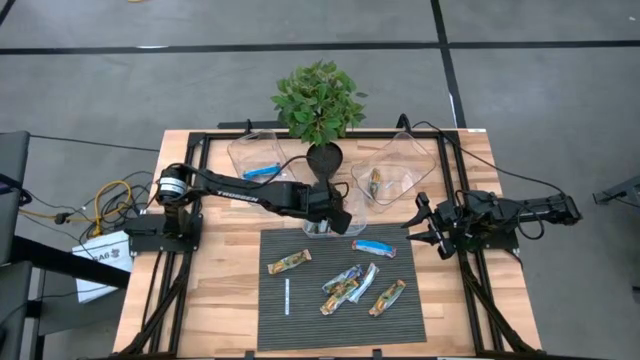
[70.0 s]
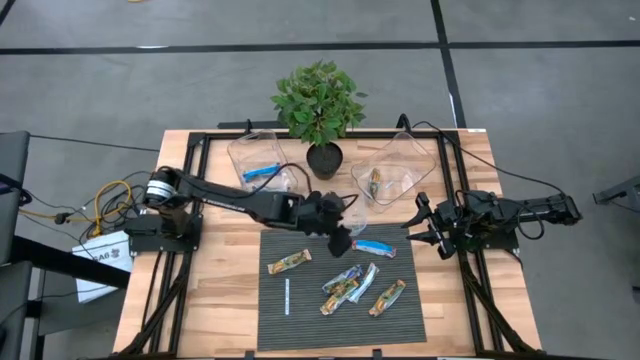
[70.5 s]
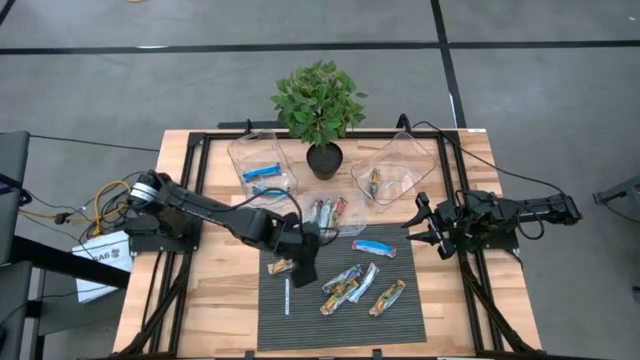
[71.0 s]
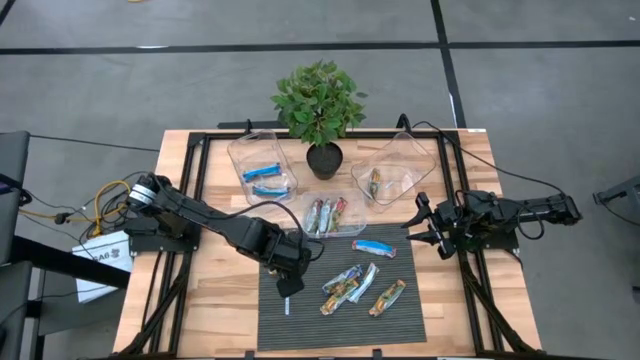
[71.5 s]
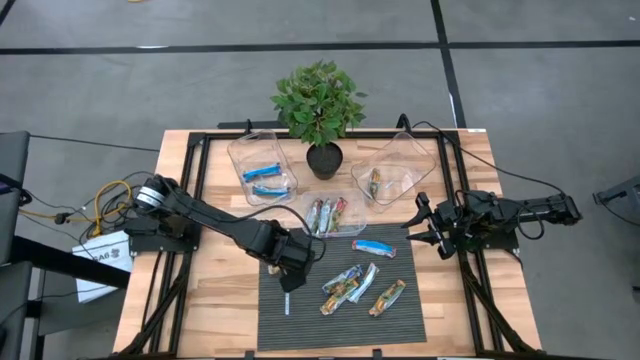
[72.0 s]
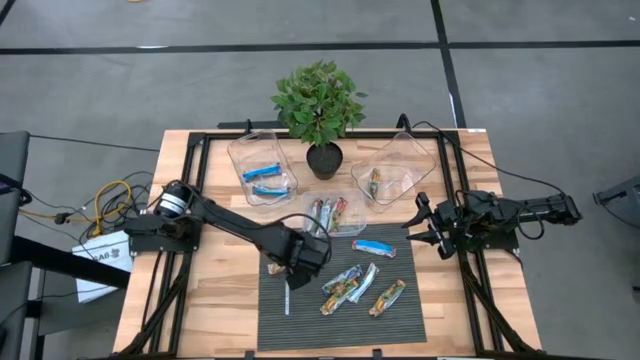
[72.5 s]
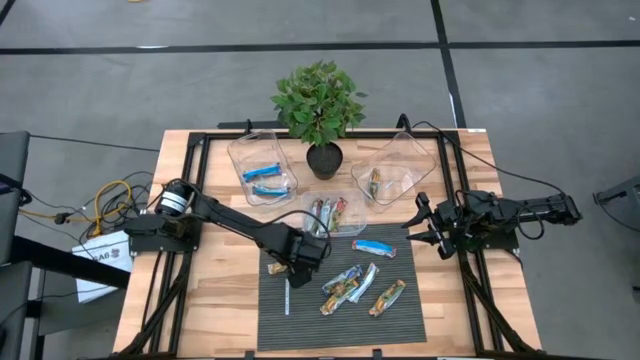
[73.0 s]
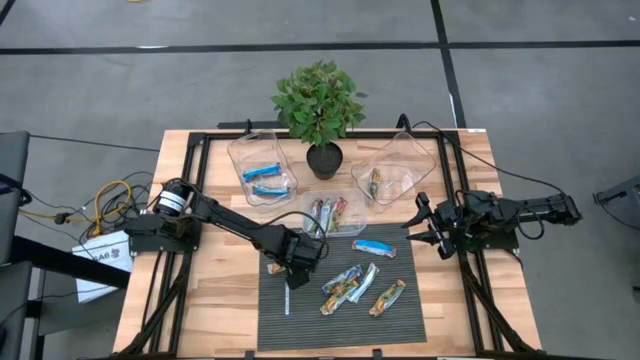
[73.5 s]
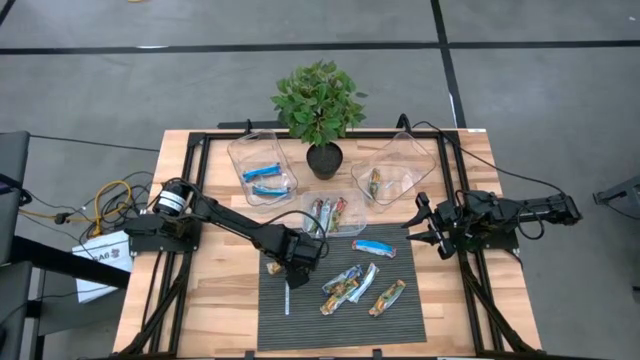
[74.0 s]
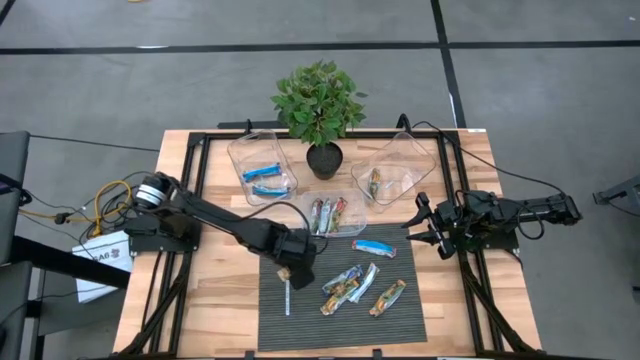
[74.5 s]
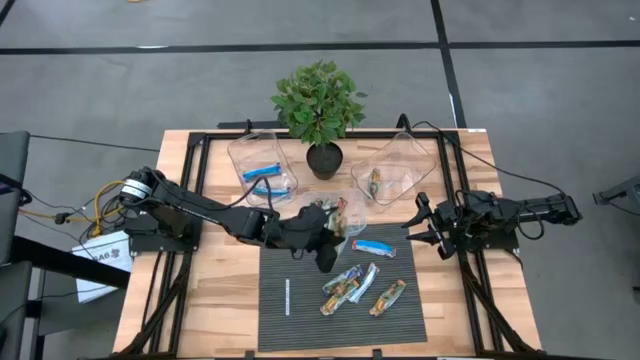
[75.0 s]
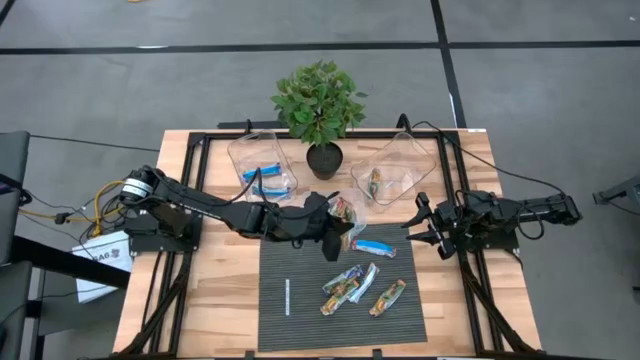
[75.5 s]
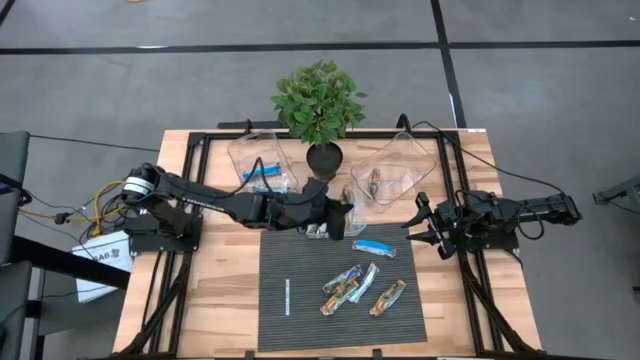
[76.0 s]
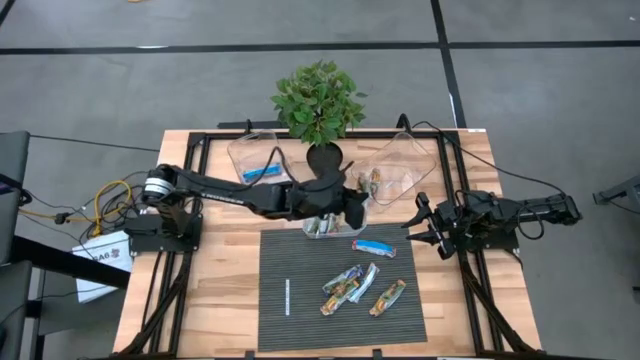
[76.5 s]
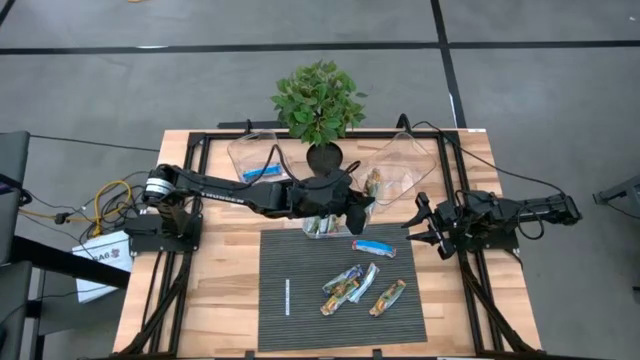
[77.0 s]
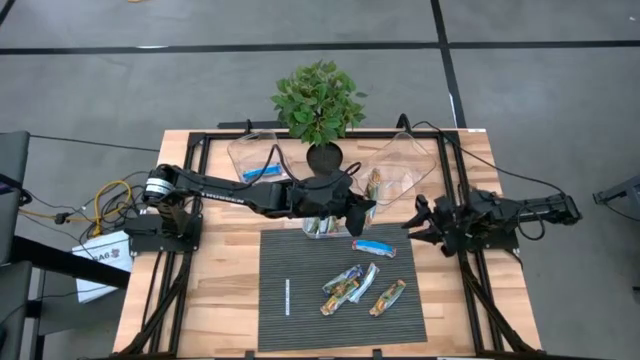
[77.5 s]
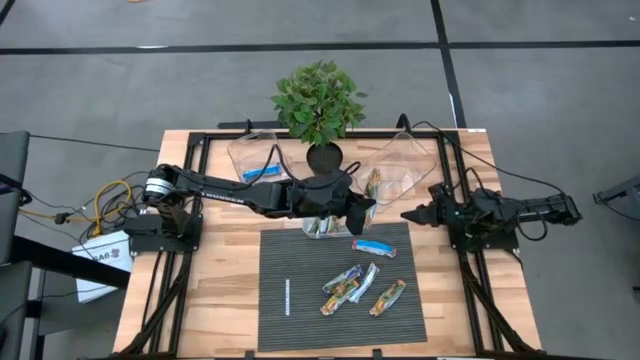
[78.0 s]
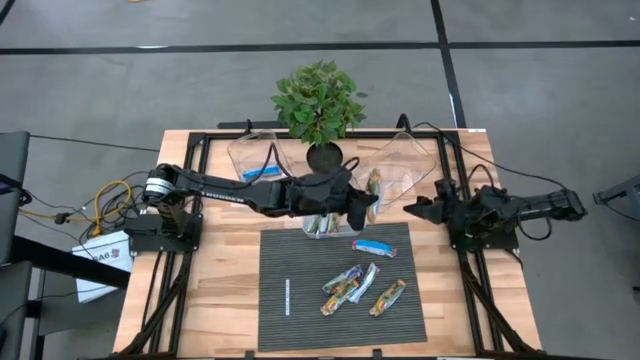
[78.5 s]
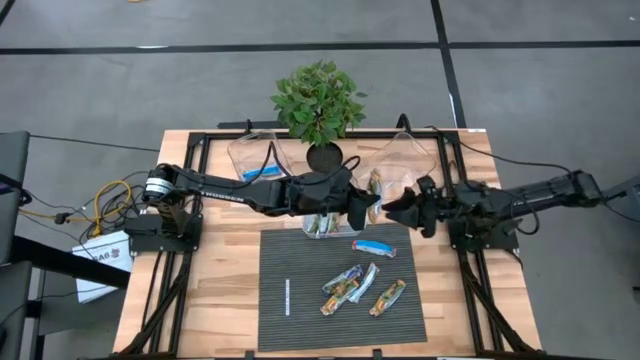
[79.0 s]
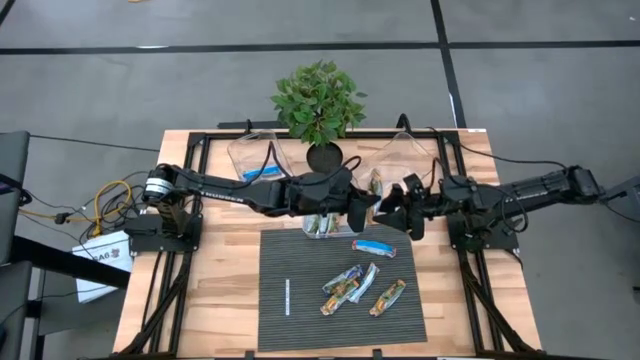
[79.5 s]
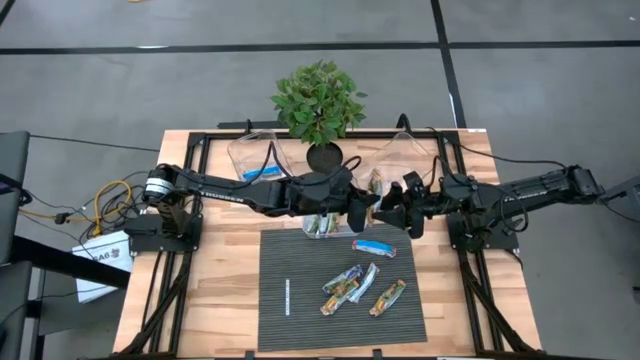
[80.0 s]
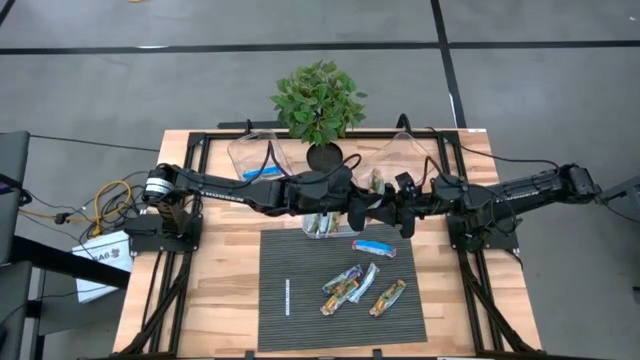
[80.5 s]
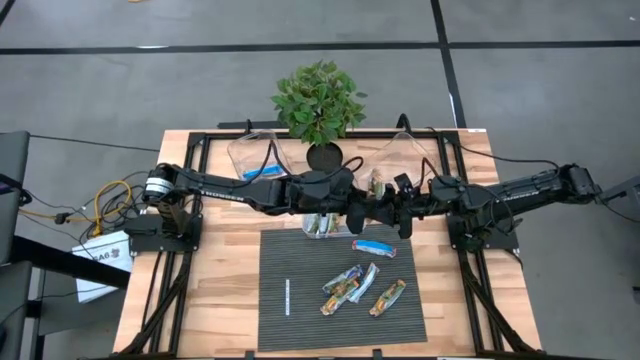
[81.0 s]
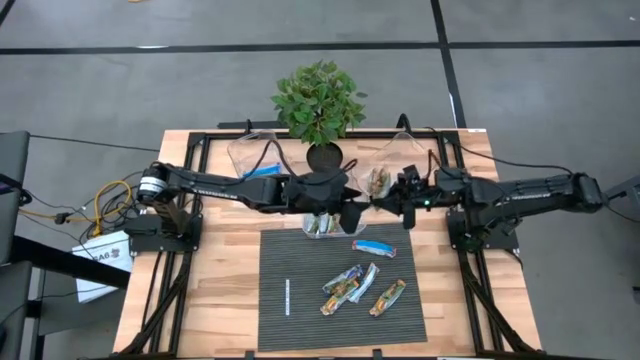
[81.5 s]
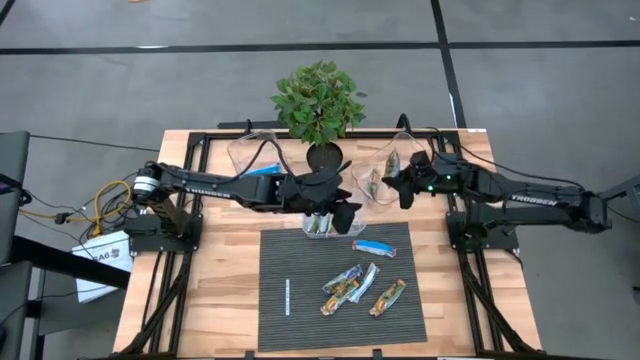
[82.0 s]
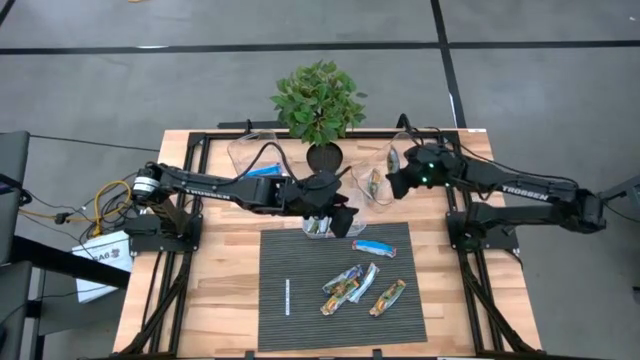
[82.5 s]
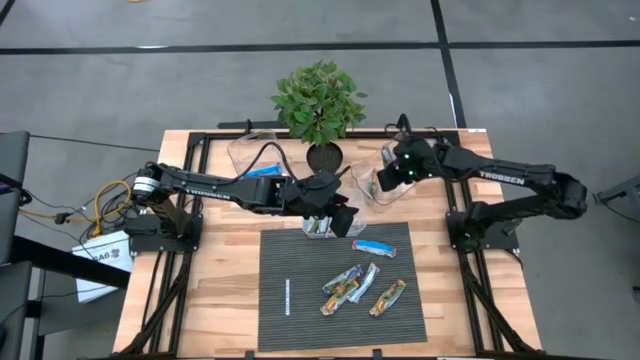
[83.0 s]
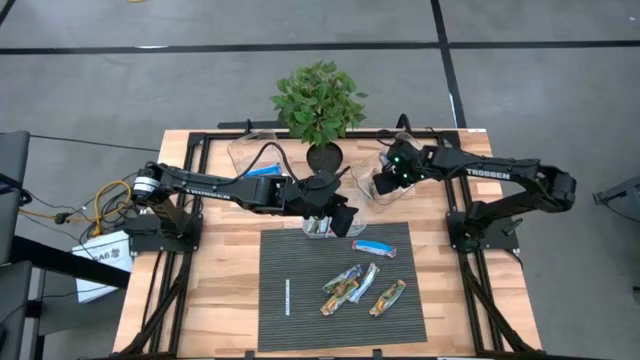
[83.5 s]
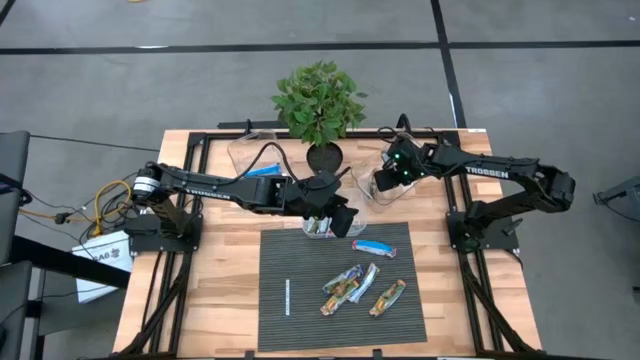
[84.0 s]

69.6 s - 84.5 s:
Task: Pick and place Granola Bars by type
Put the yellow granola bar into the right transparent bin

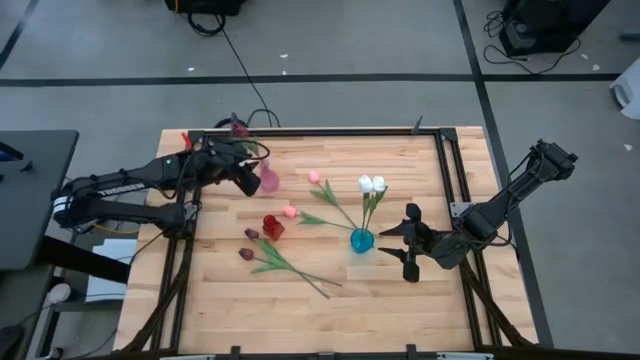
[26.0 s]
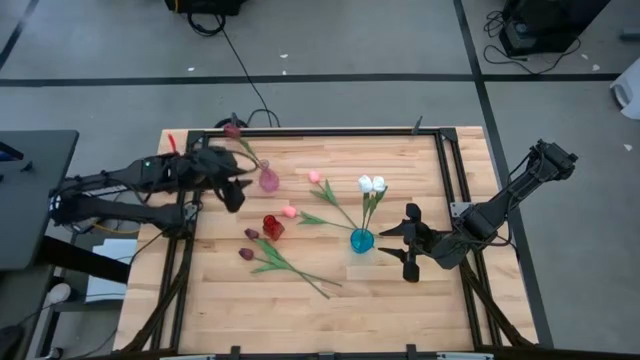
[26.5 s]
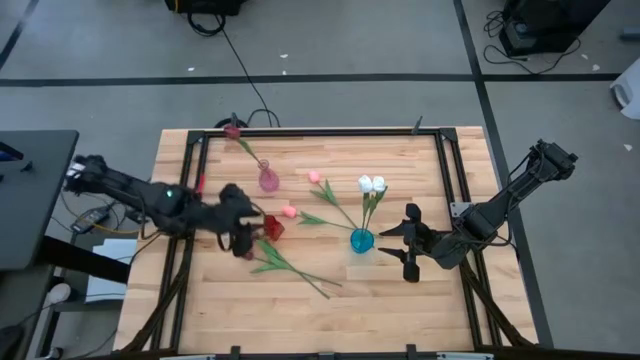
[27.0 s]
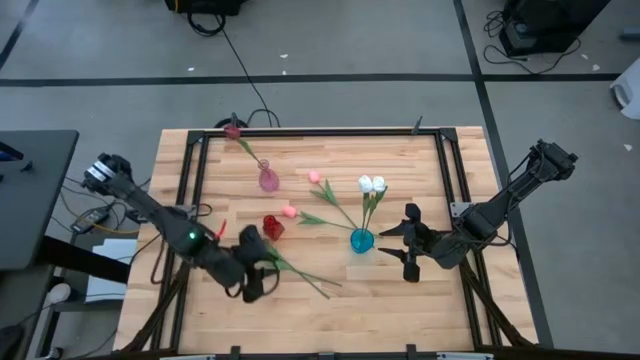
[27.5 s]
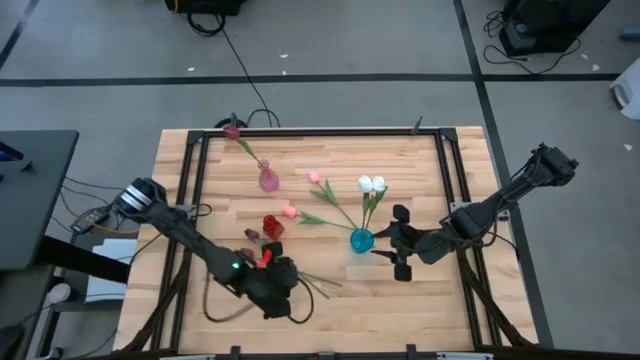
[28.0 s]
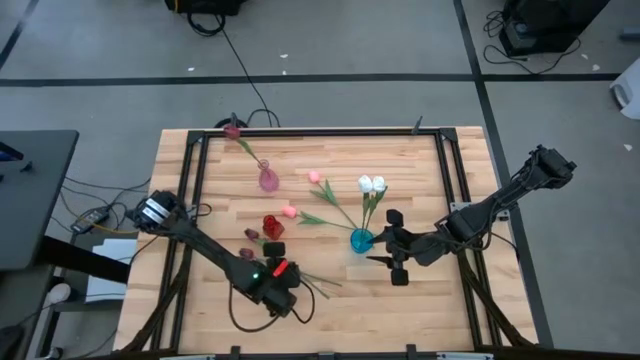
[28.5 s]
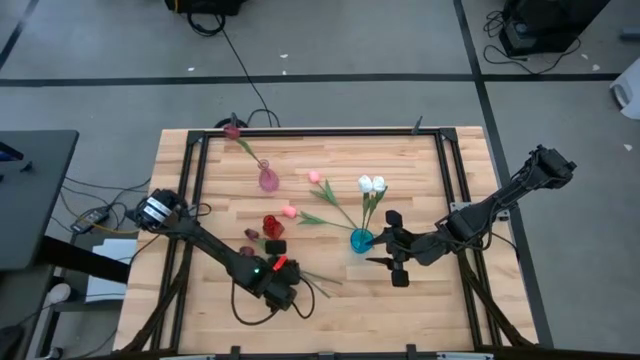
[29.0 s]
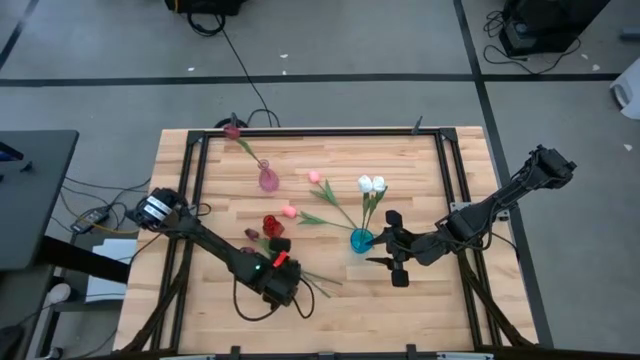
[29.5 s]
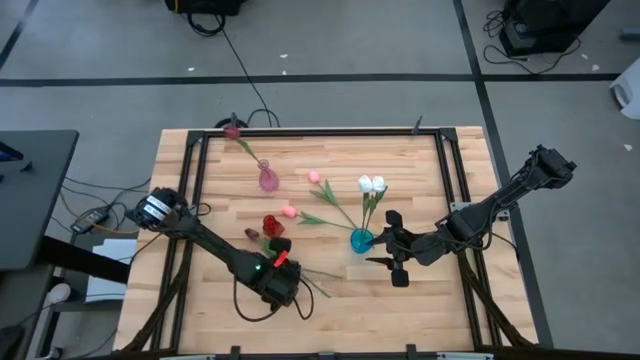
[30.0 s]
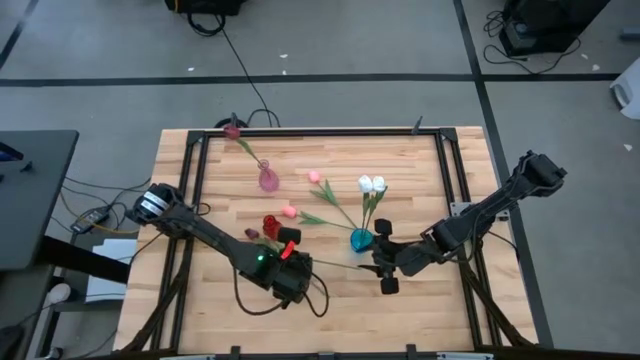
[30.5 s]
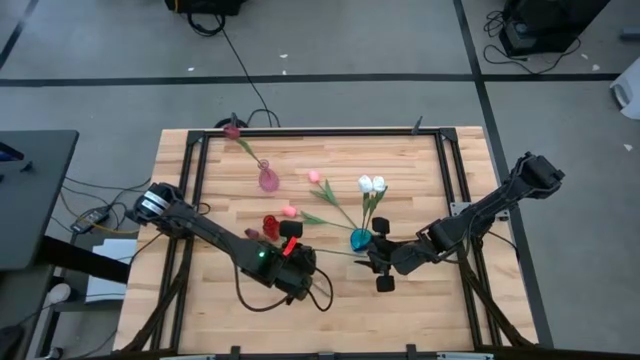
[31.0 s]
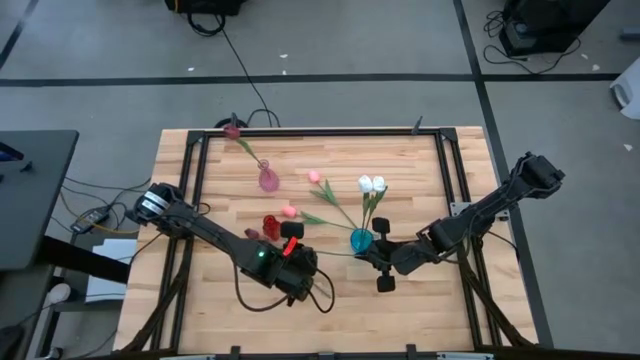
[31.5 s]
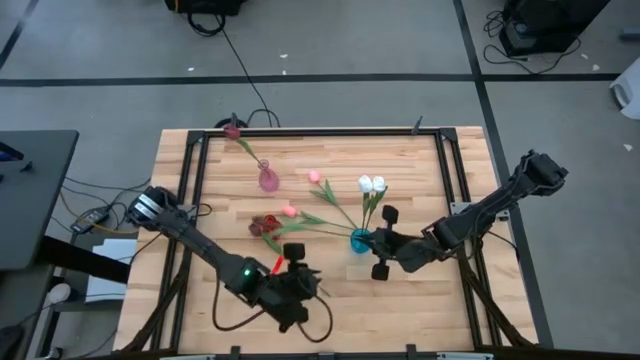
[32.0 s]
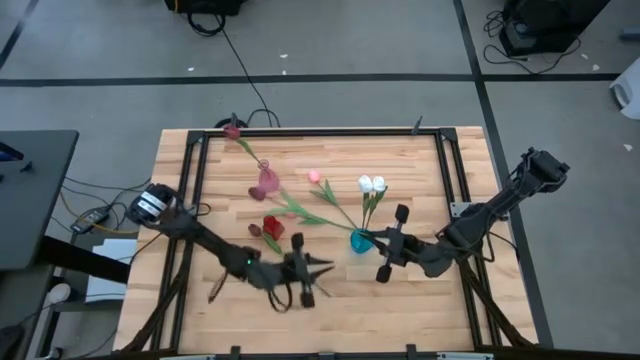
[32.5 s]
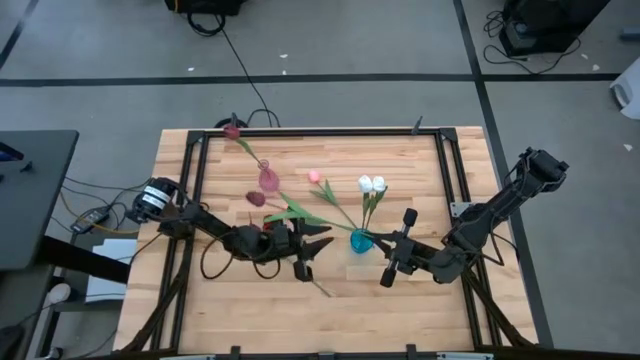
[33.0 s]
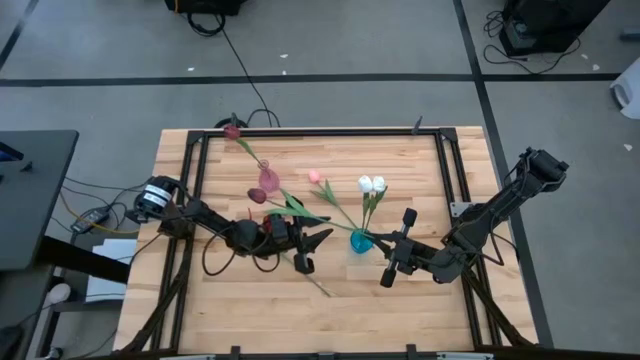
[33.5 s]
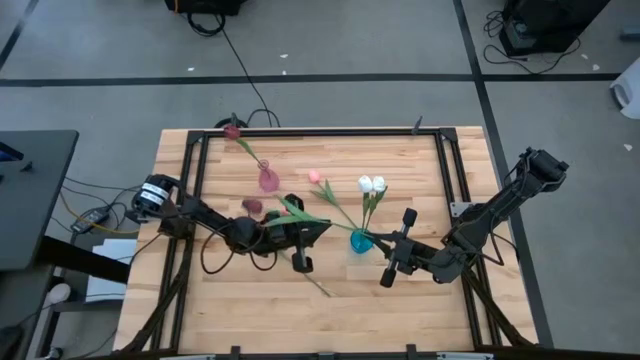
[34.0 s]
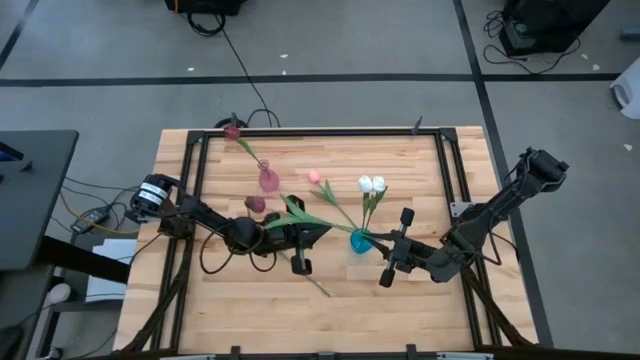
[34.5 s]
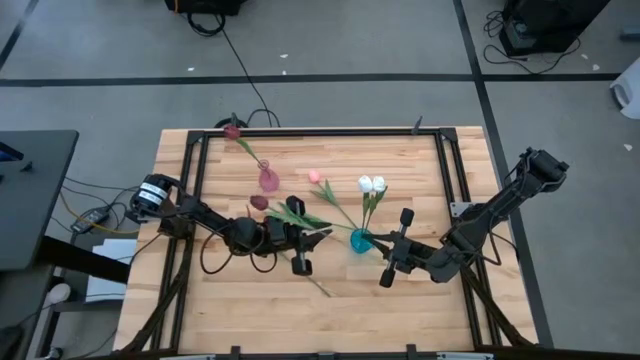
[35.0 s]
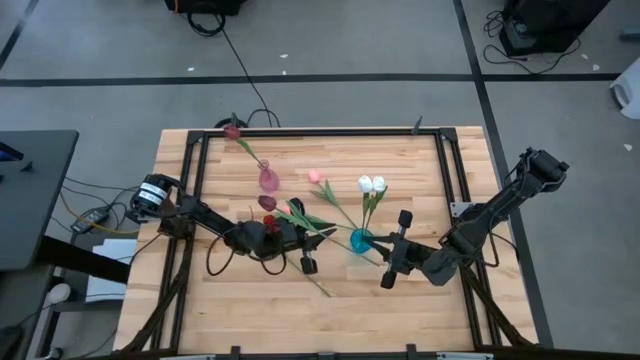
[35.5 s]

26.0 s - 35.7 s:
Task: Sort flowers into vase by color
Put the bottom red tulip into the pink vase
